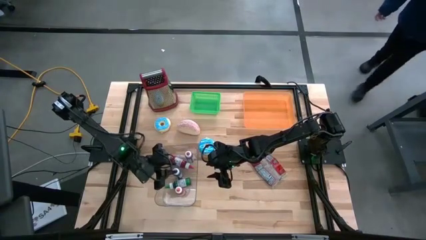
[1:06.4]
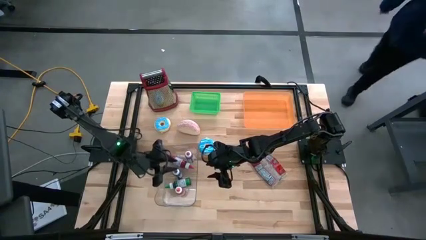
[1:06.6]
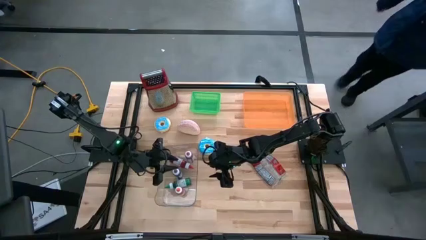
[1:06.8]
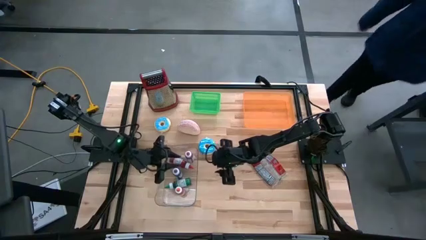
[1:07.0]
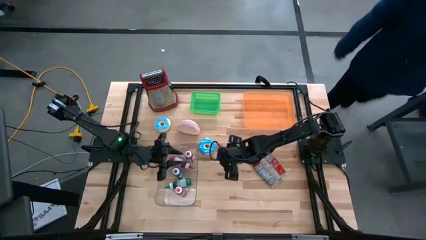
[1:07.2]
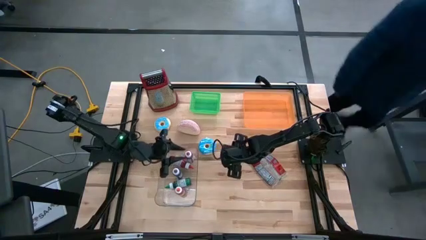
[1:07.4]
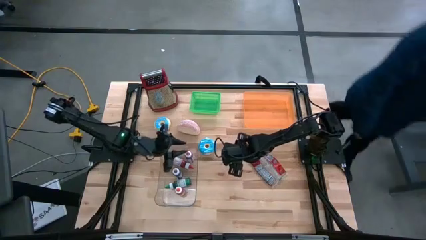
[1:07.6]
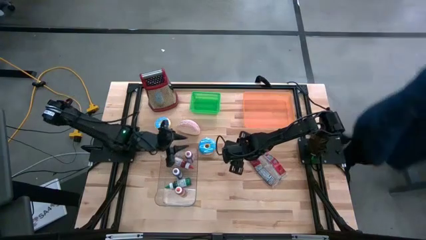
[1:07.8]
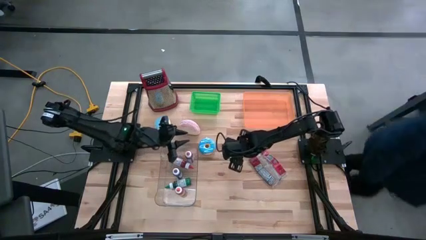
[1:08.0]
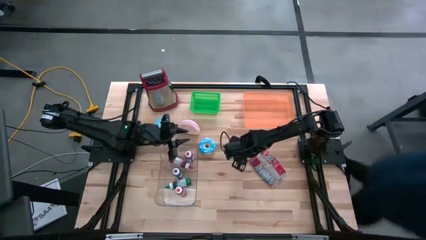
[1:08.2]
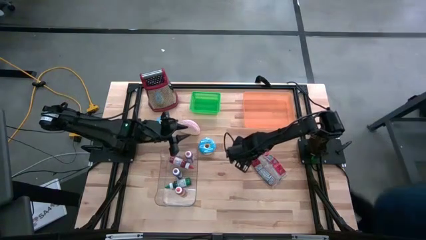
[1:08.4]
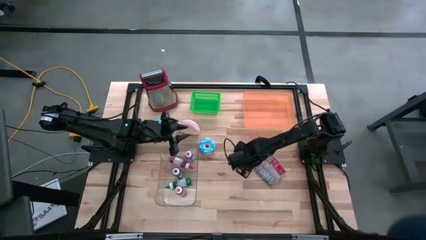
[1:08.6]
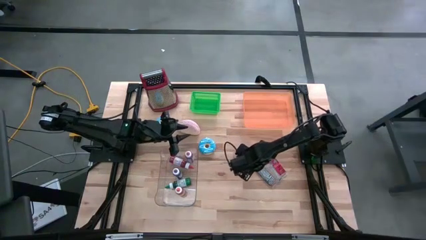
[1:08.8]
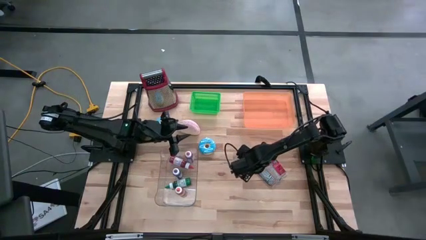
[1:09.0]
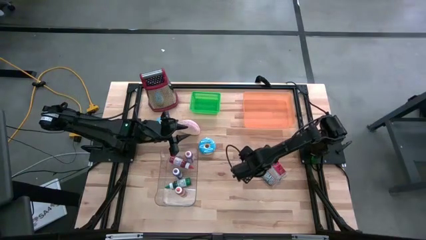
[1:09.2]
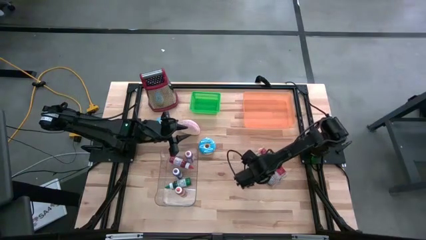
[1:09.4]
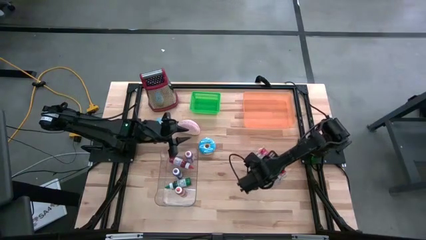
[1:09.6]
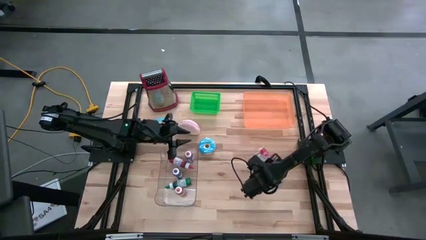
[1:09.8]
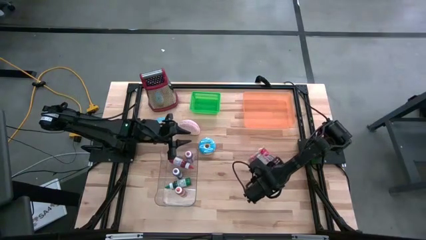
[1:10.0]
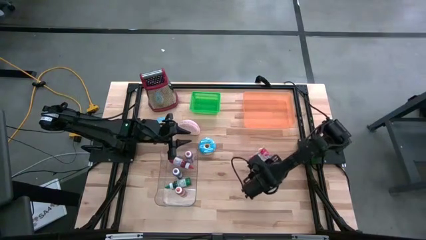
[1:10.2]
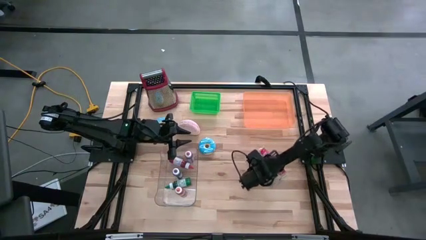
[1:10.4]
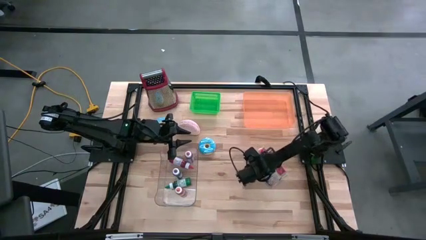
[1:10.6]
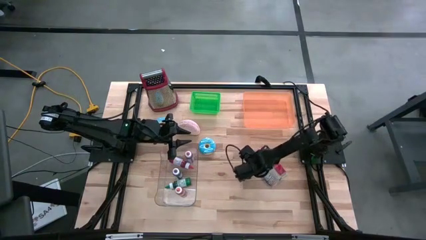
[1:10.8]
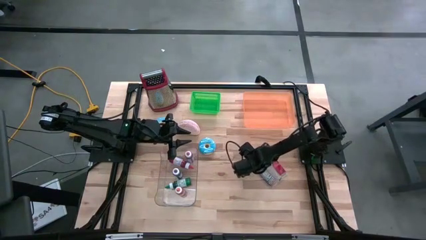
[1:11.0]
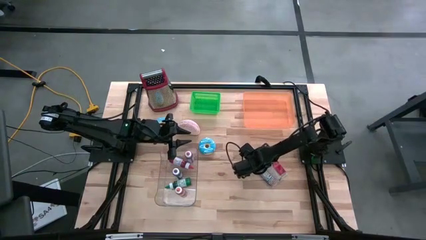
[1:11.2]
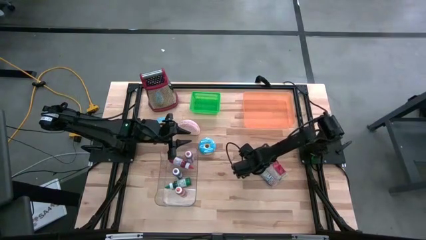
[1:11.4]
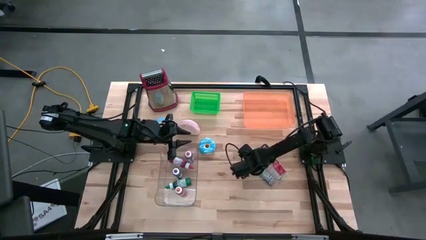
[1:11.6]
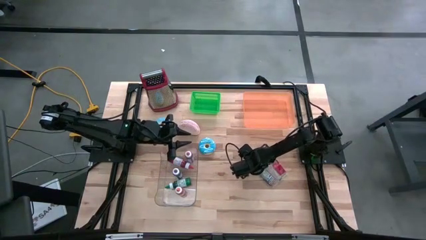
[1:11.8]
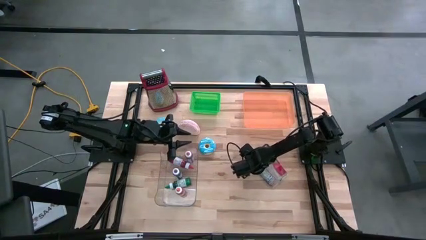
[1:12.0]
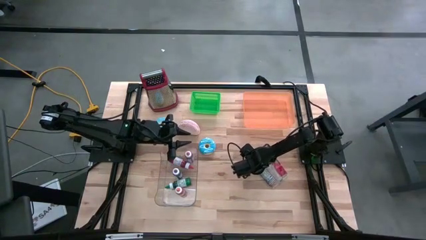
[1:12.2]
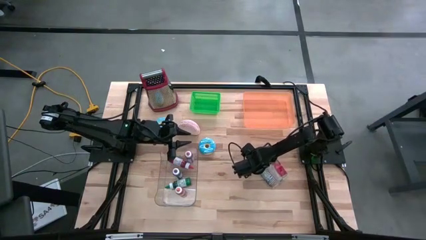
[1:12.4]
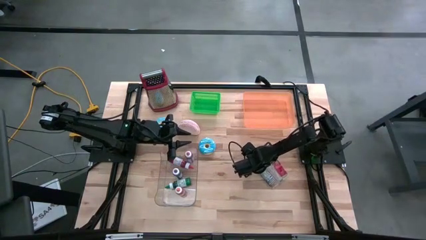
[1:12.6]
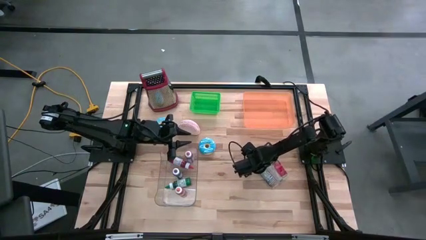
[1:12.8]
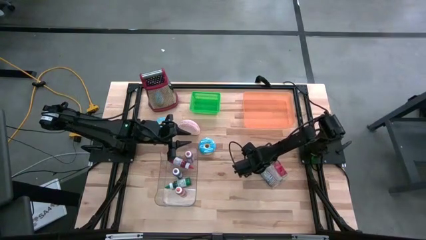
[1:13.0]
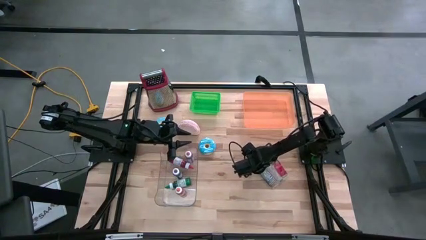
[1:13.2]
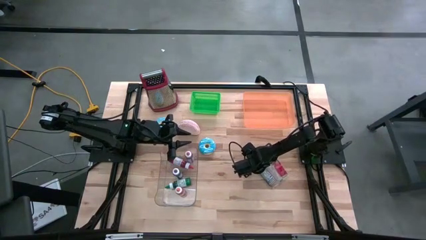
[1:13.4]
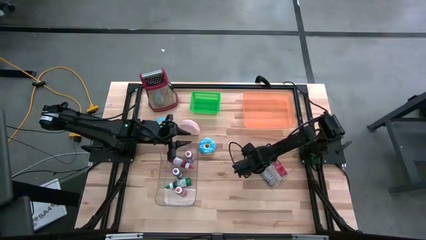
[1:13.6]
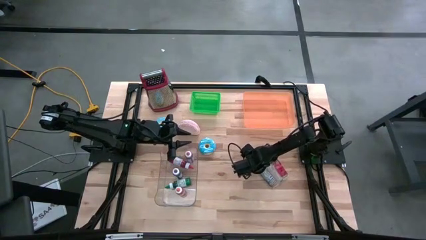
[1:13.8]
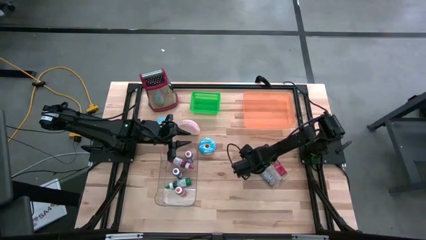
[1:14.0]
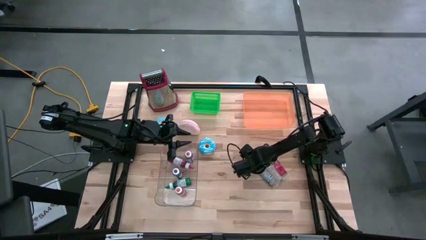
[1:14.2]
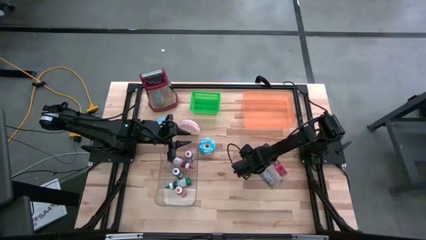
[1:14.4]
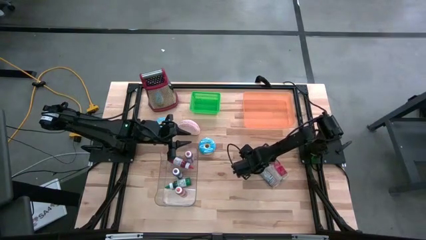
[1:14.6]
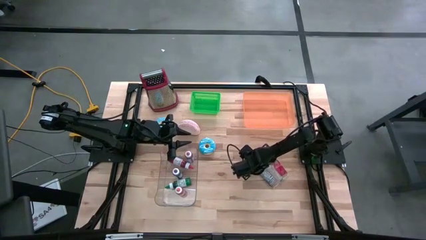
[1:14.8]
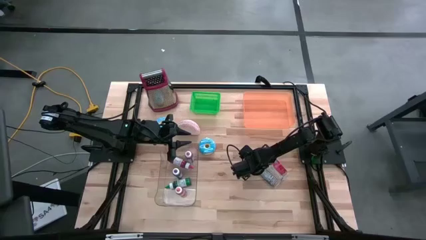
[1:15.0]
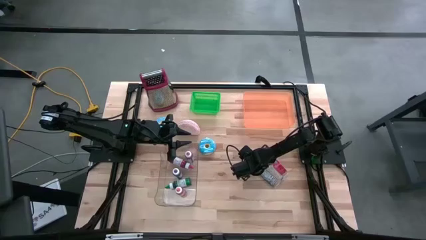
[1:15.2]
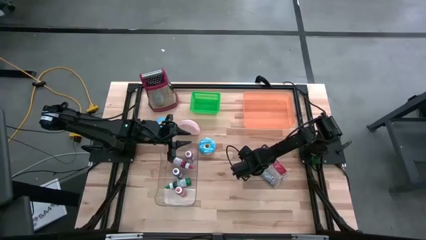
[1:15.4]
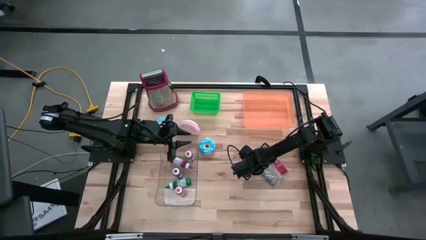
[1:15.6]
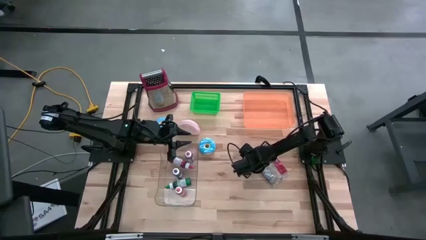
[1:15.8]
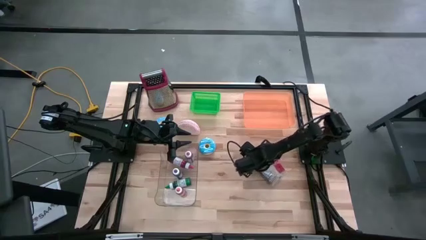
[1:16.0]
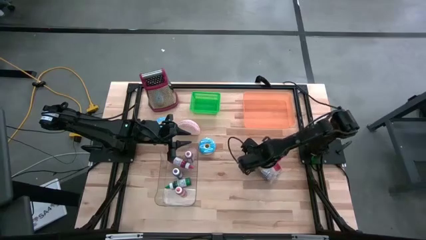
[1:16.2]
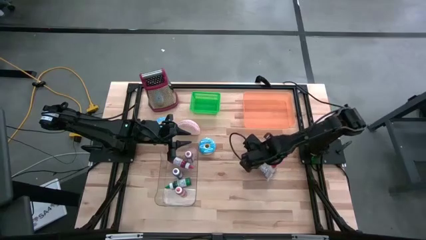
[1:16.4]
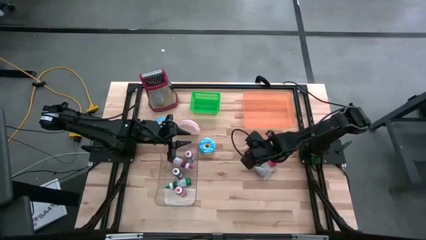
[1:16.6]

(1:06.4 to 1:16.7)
Put the popcorn bag into the orange bin
